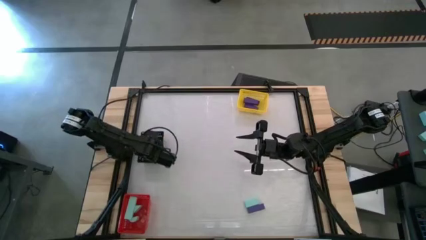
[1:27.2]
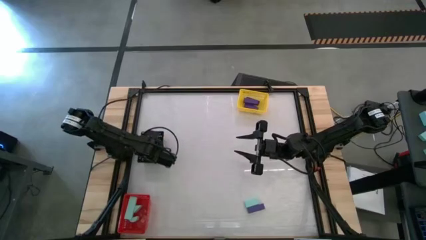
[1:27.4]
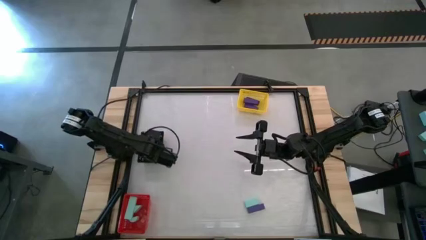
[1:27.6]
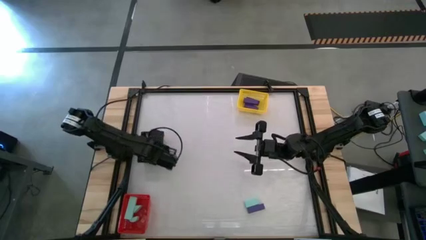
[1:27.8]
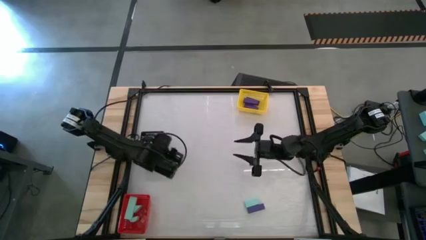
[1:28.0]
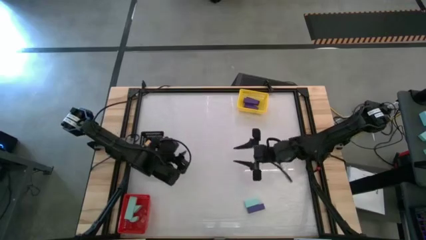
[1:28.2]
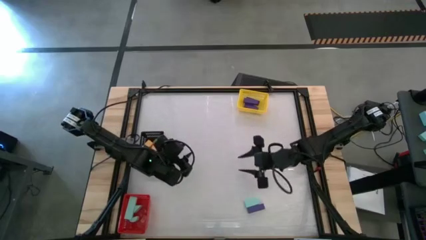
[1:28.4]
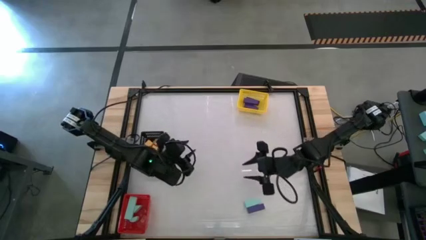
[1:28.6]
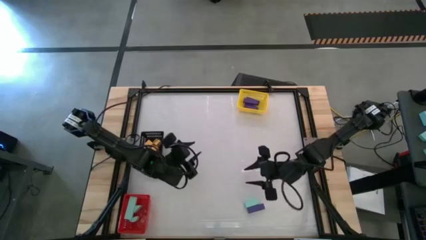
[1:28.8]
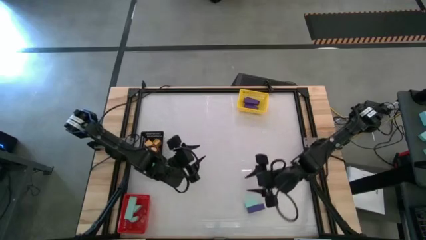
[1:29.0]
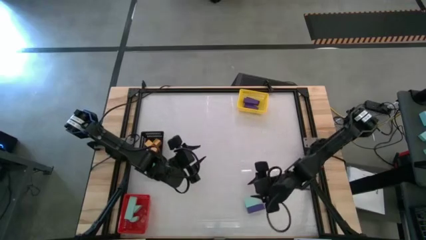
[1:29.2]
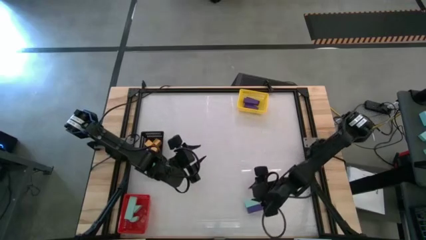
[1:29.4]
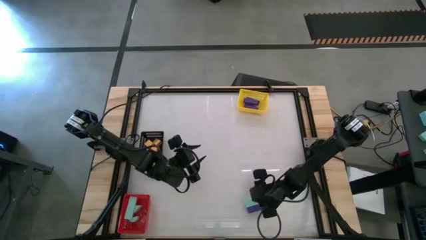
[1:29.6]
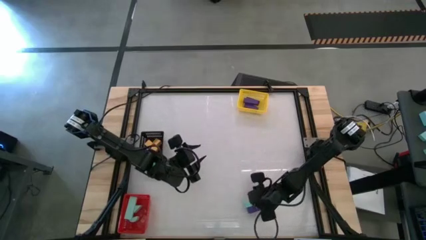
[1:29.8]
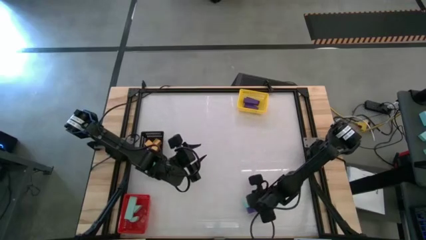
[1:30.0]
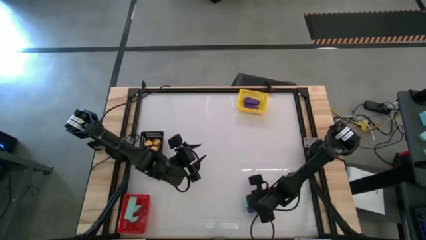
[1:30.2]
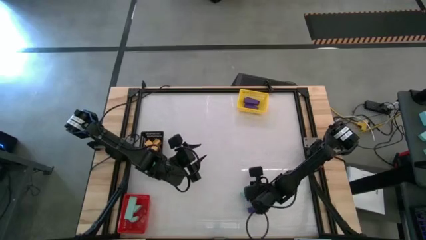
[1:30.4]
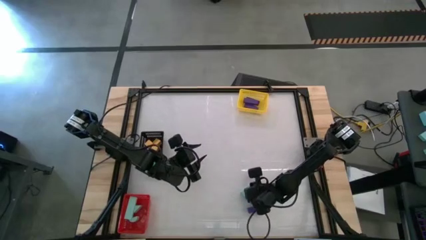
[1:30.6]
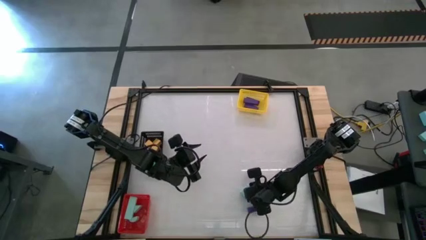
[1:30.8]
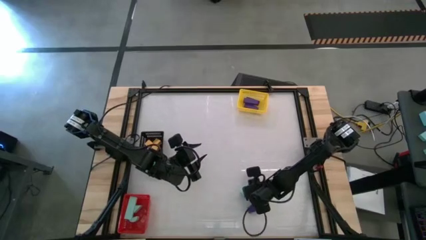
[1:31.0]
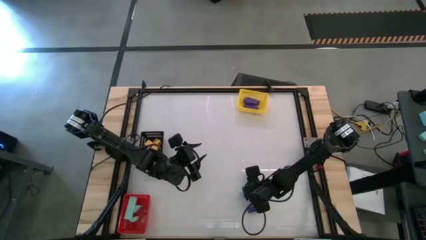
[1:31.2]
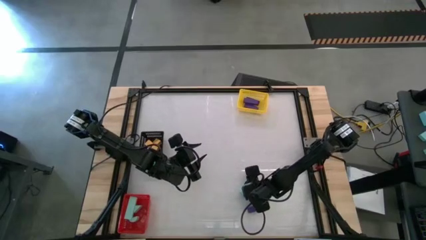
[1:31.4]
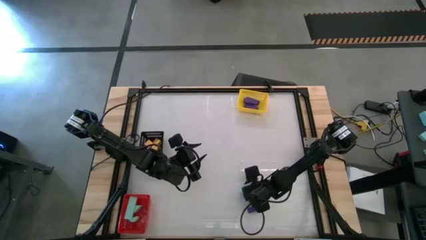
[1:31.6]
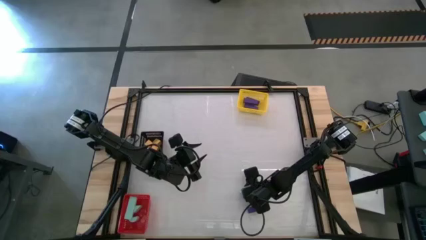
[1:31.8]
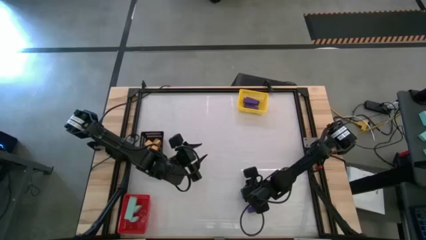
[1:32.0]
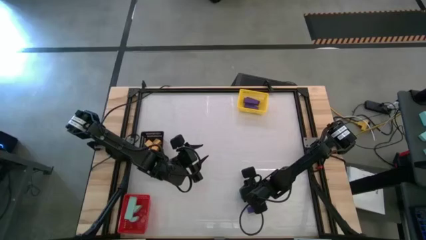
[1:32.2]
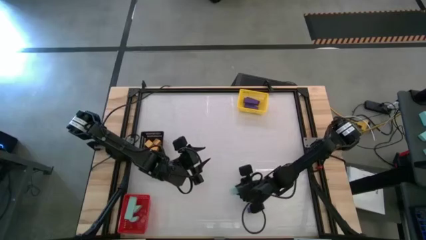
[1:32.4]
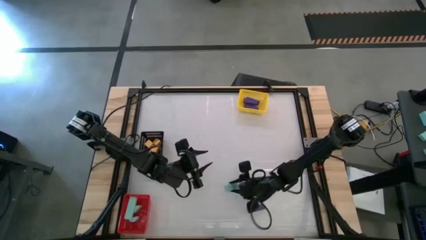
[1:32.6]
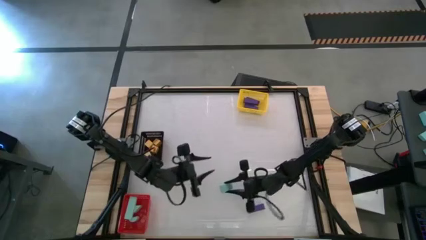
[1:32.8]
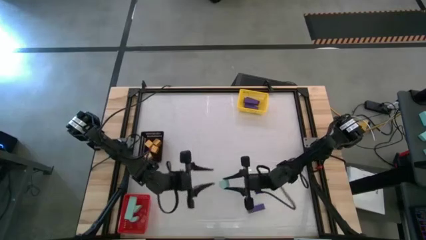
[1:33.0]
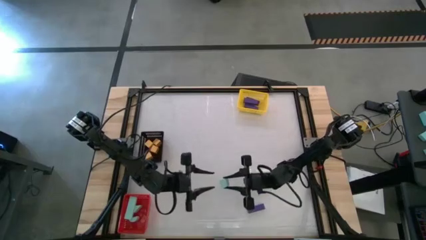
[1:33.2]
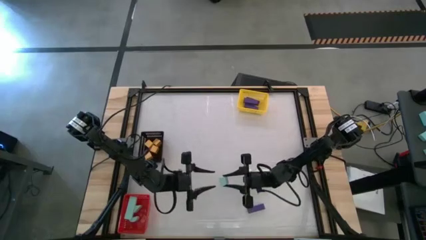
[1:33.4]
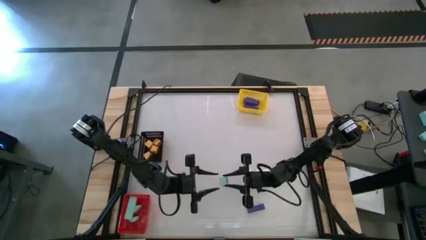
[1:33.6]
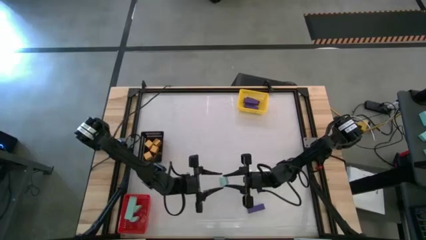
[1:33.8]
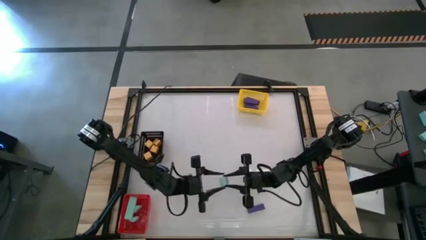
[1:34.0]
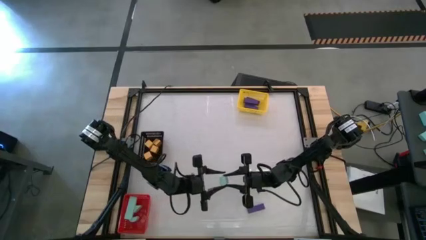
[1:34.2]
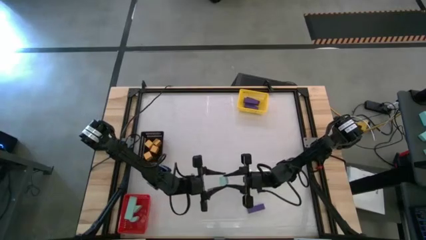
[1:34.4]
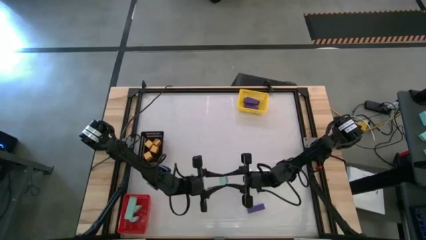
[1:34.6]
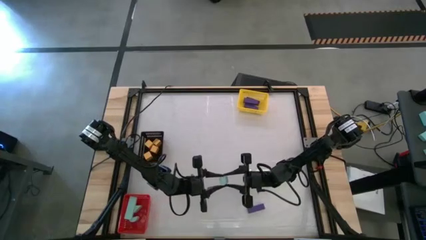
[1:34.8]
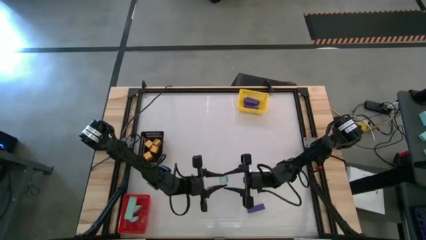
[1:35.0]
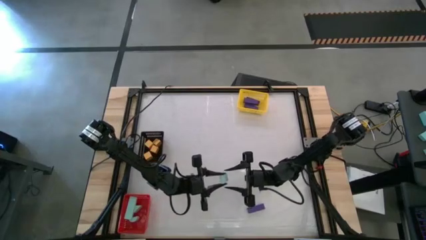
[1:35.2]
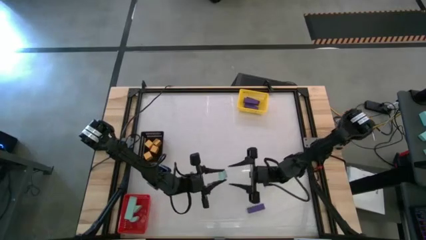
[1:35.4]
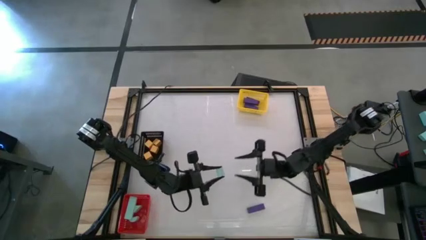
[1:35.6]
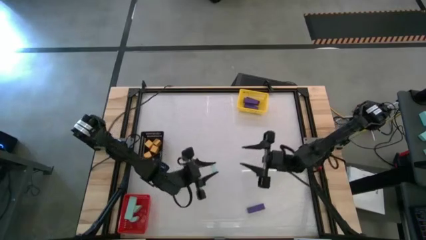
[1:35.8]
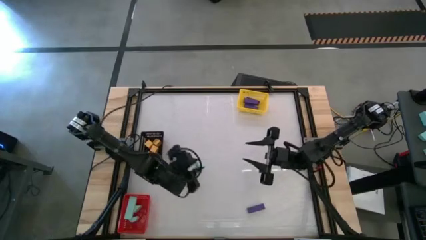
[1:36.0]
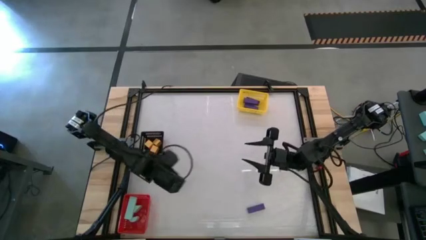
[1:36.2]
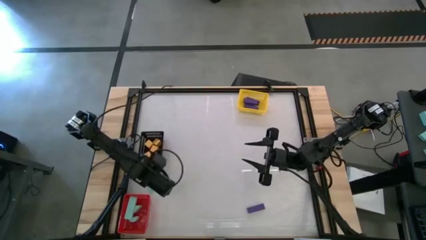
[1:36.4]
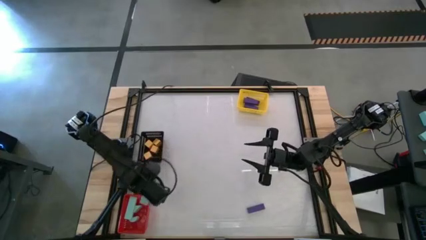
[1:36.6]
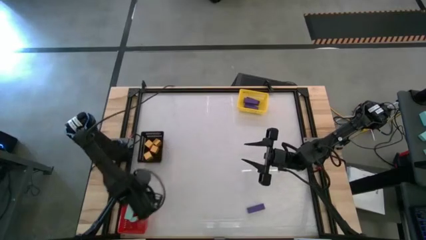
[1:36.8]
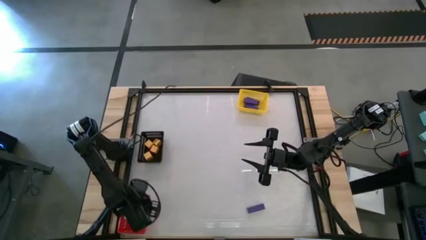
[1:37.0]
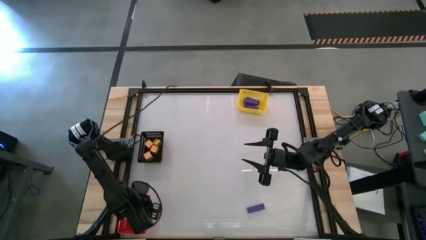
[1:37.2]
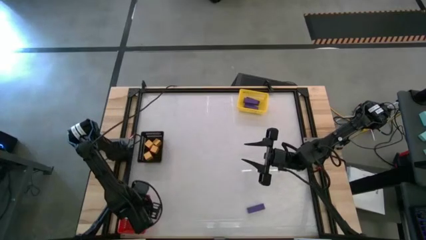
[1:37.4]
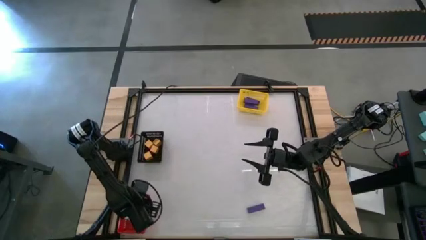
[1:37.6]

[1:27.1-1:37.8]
Task: Sort & place blocks by color
Put the light blue block into the red bin

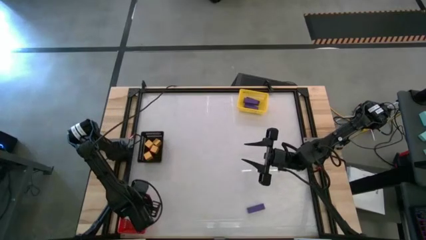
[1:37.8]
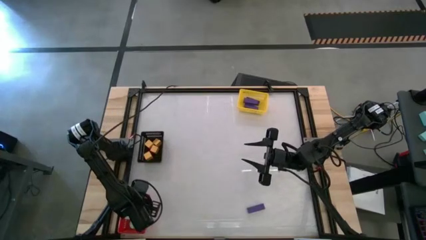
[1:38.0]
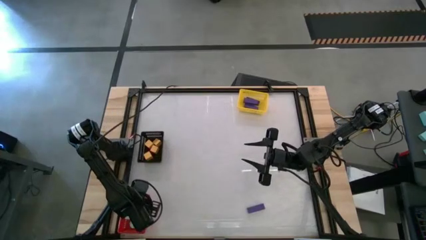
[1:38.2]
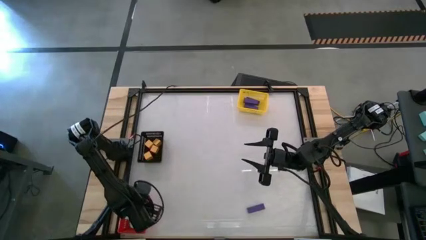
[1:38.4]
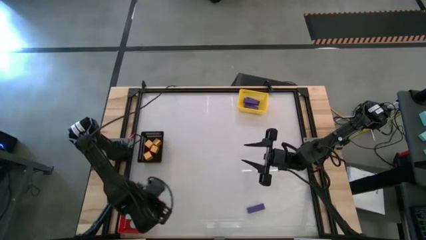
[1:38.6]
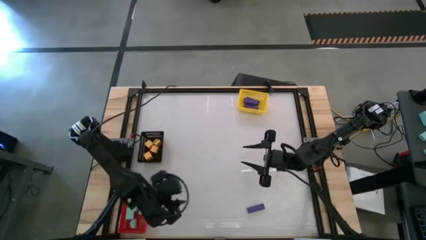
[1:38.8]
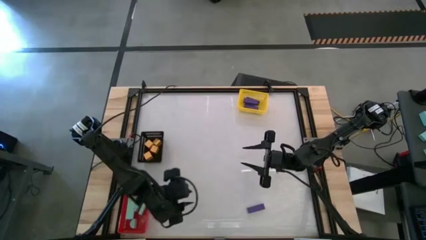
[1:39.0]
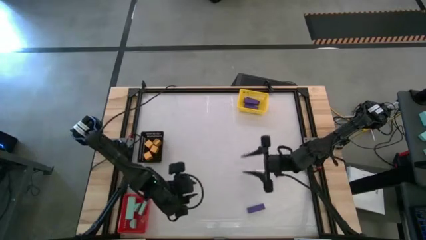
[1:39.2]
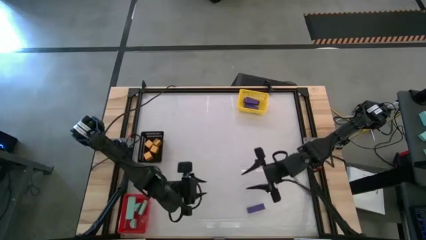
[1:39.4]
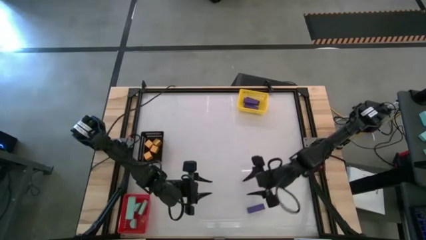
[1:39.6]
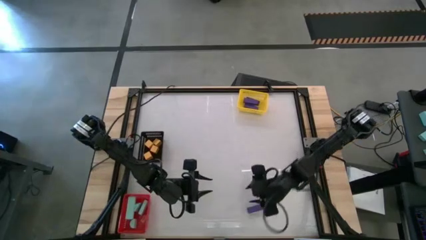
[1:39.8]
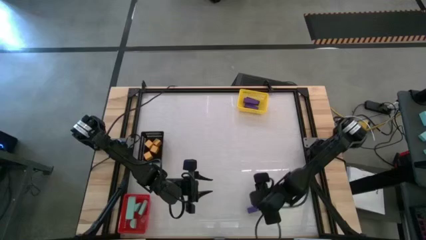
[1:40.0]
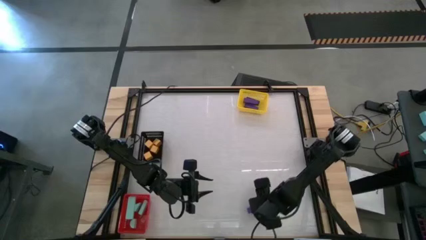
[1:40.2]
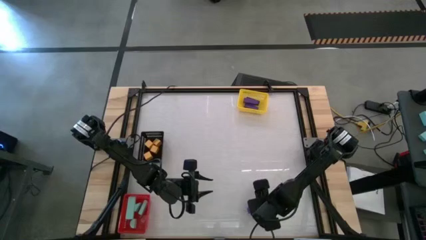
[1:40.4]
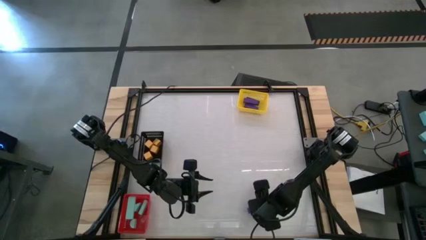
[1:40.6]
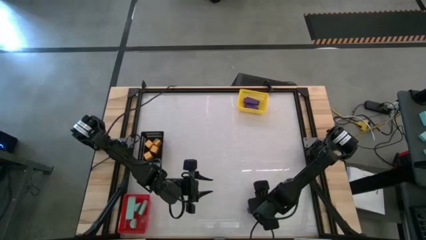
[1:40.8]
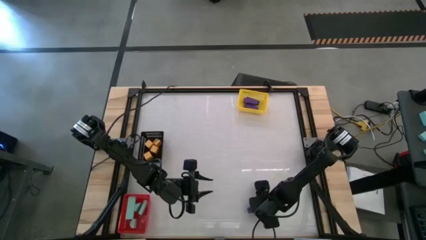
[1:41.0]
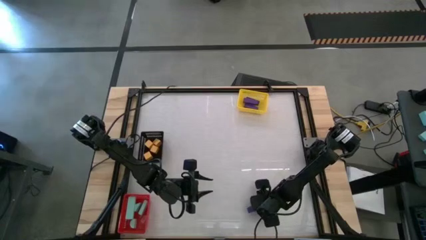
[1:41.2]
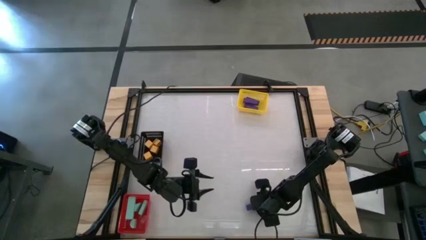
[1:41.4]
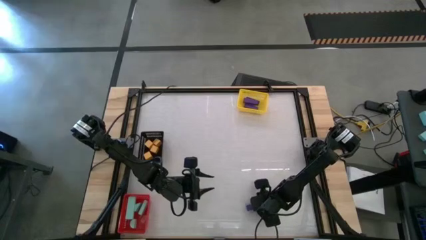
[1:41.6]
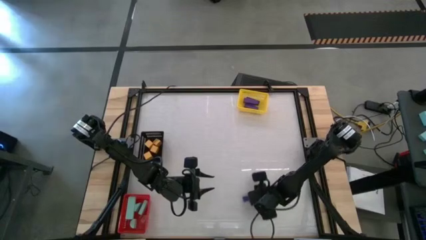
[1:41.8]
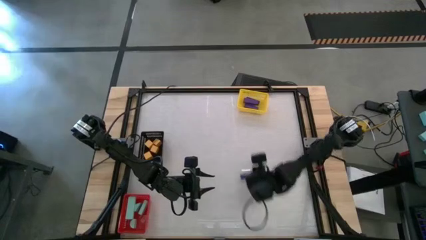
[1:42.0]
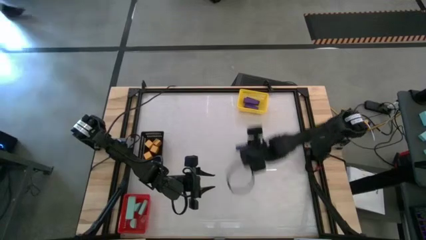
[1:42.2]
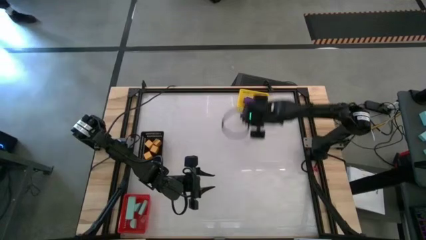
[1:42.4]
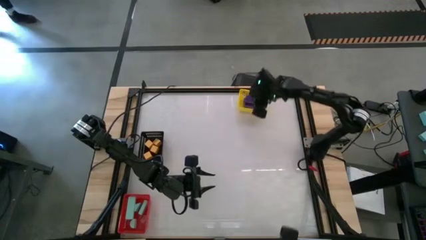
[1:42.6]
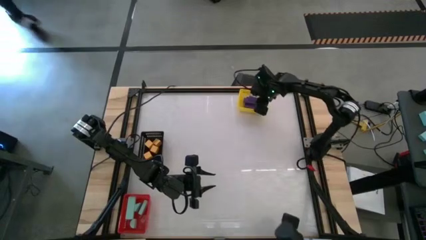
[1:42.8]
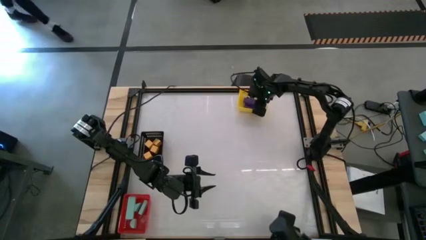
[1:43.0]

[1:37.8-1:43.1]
Put the purple block into the yellow bin
